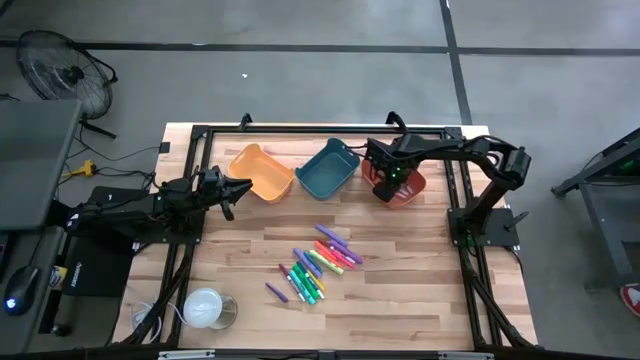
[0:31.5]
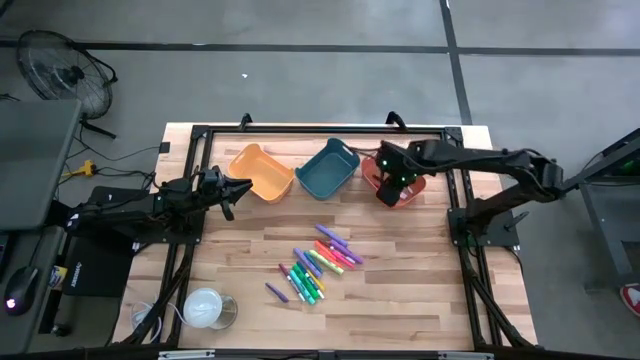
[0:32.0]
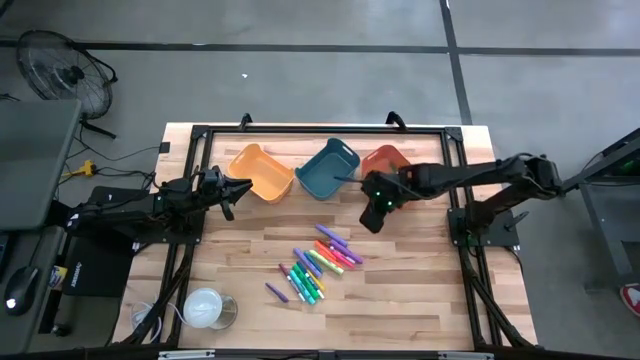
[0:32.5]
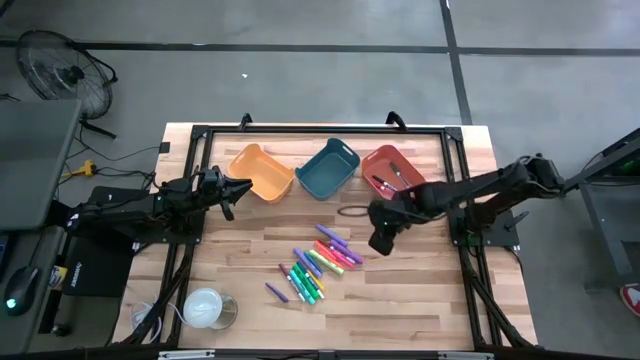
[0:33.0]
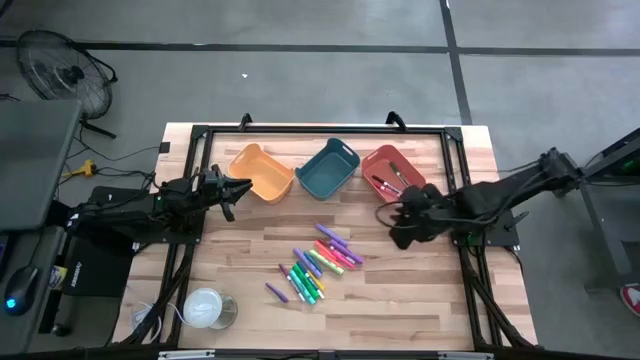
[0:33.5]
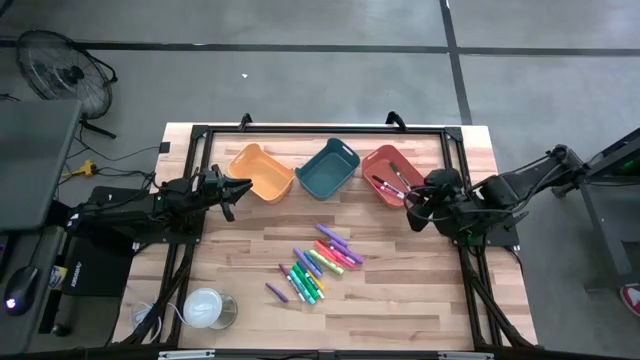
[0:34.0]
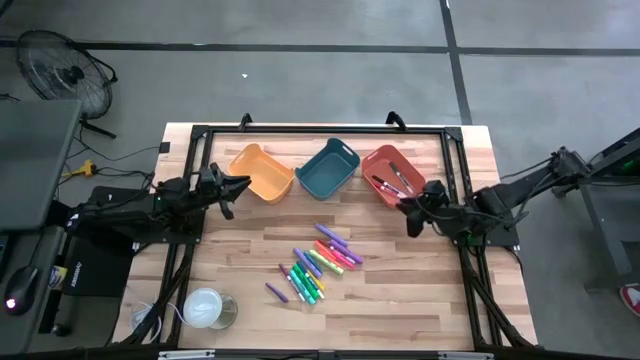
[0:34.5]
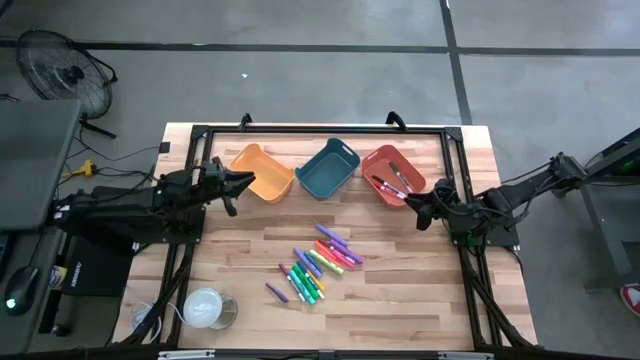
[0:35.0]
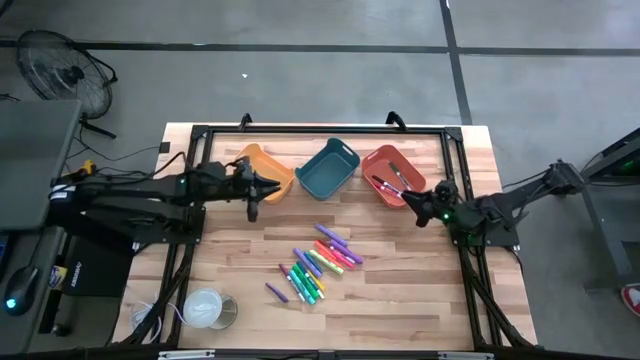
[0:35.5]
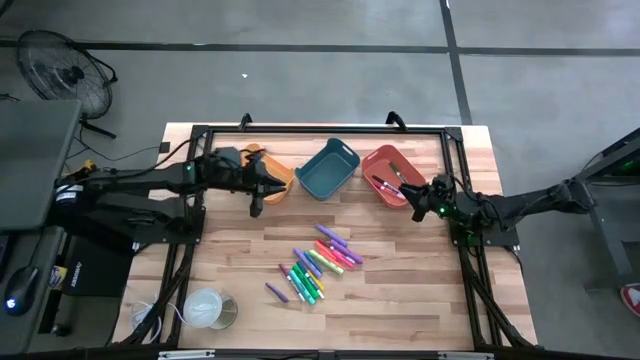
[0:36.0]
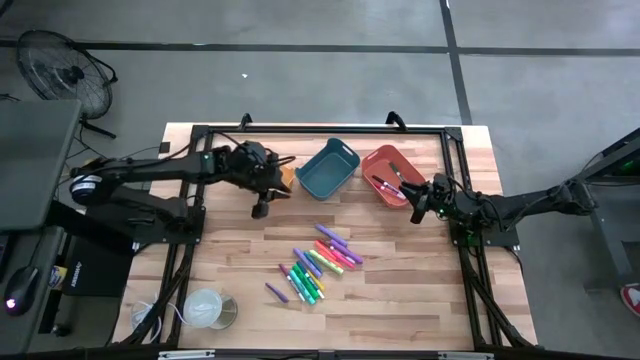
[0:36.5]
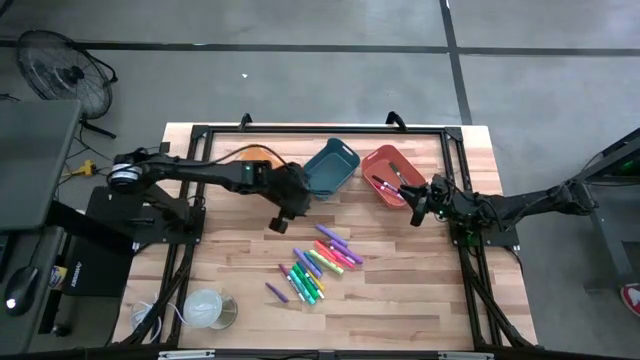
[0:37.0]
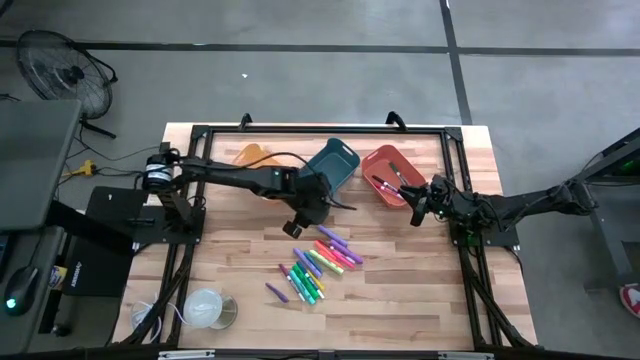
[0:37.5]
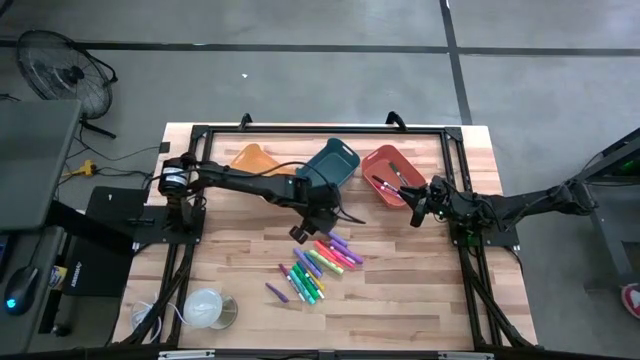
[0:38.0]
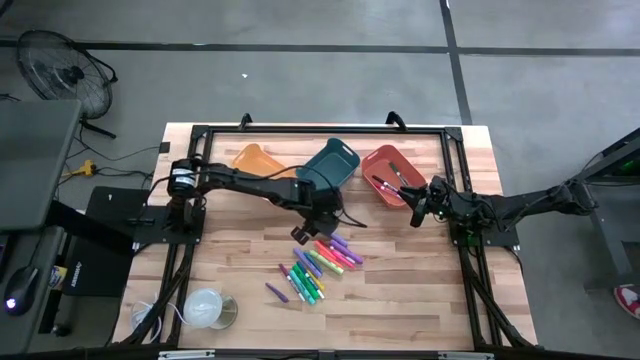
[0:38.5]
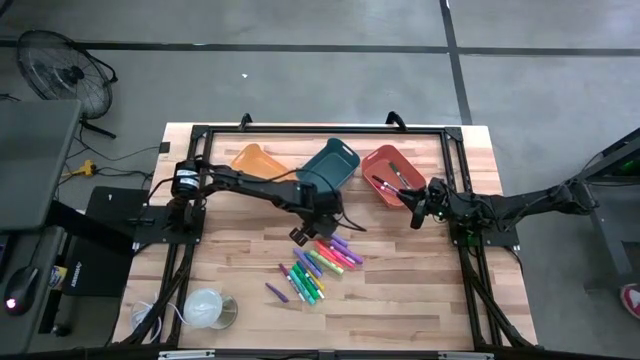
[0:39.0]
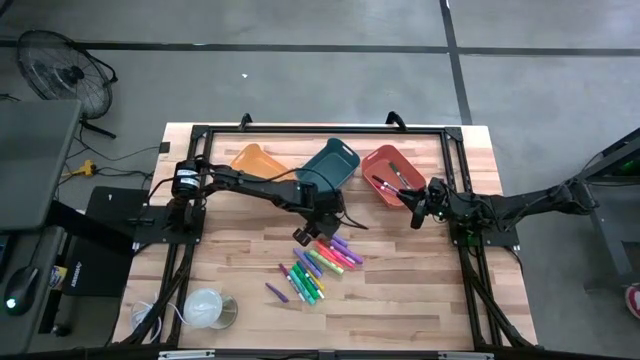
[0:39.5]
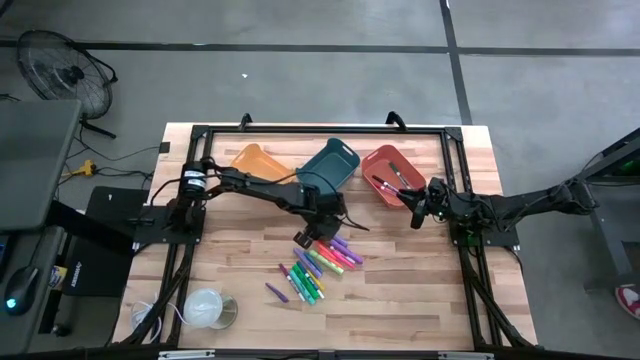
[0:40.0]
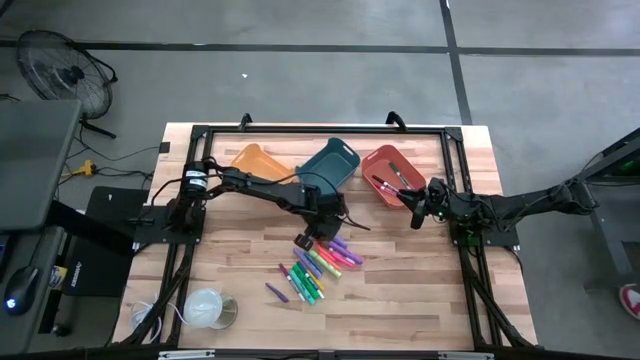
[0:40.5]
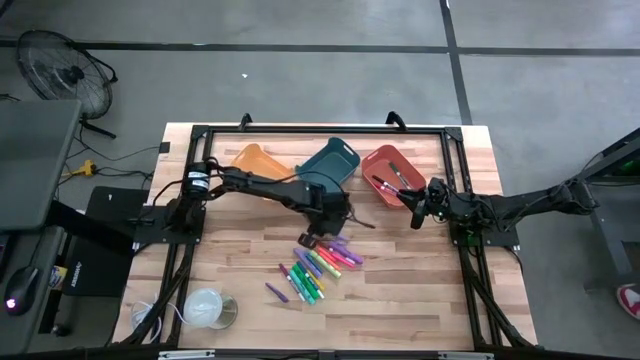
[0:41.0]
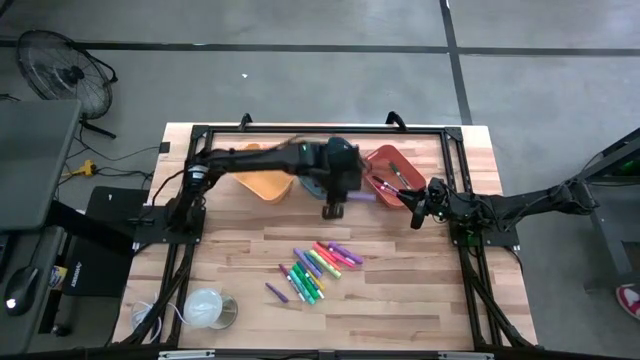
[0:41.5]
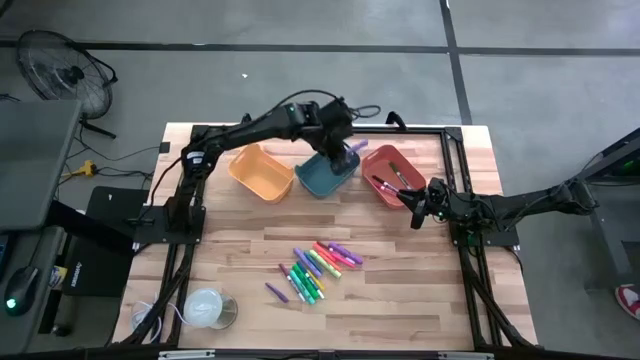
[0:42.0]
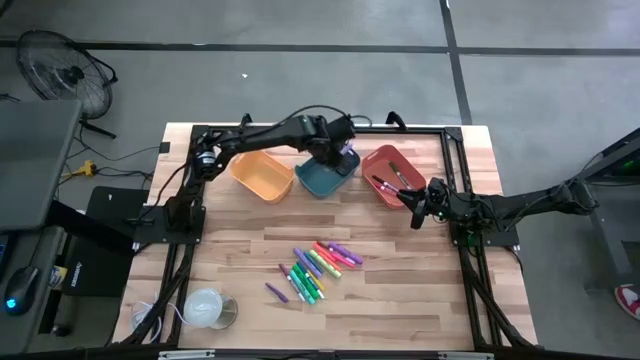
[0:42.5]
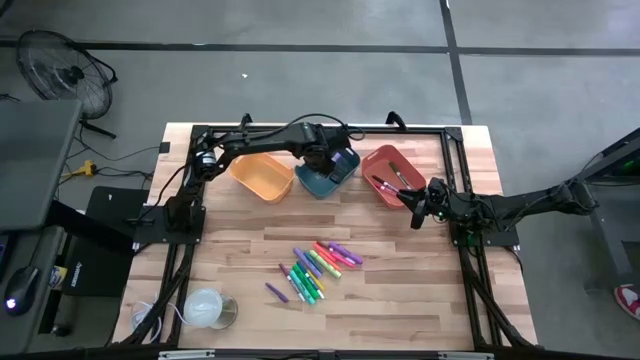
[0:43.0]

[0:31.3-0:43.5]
Task: Pick & Place Markers
Put the top purple highlighter pen into the blue bin

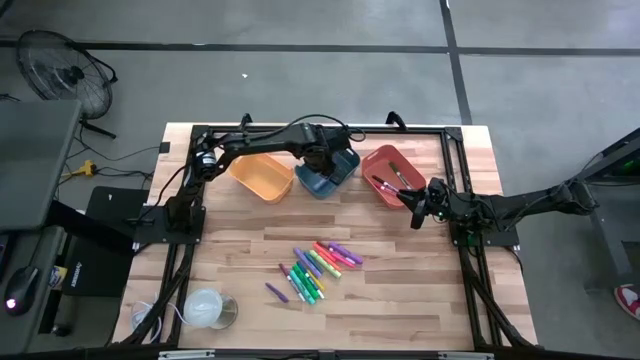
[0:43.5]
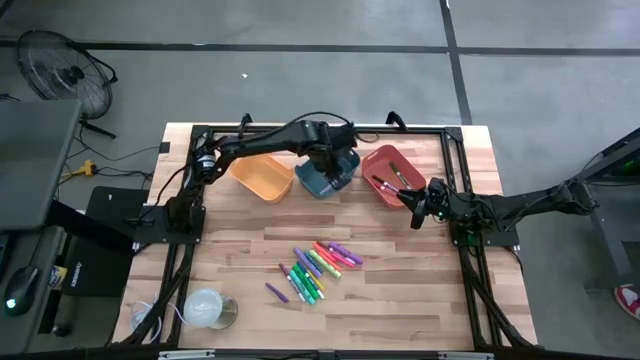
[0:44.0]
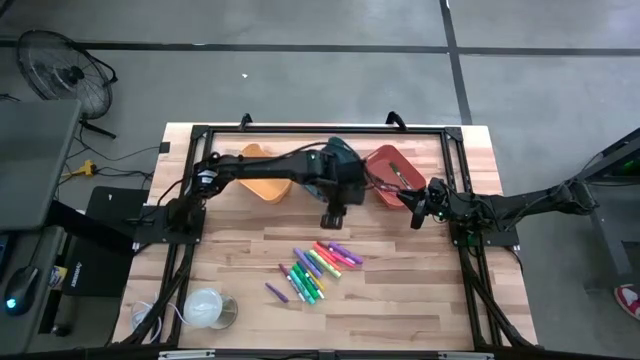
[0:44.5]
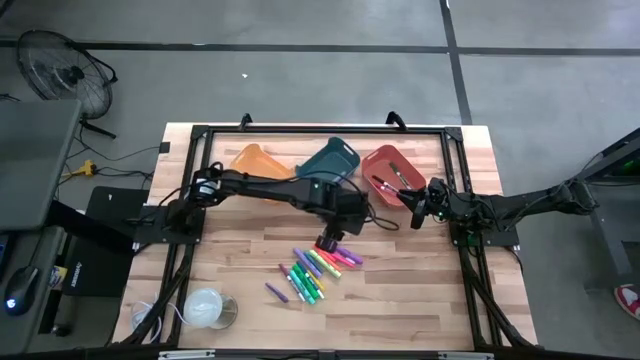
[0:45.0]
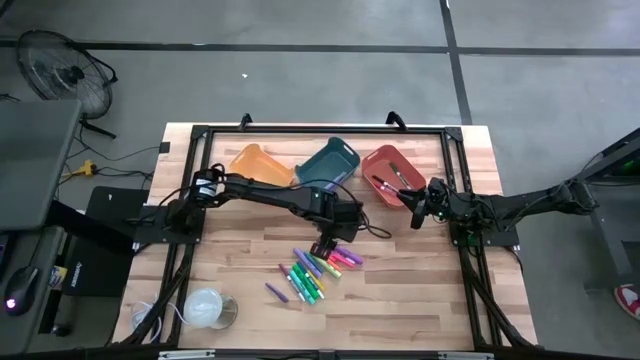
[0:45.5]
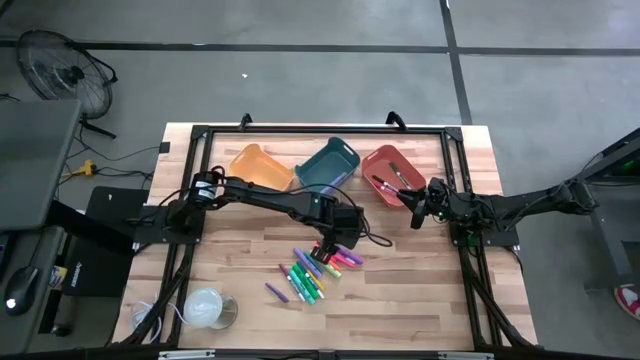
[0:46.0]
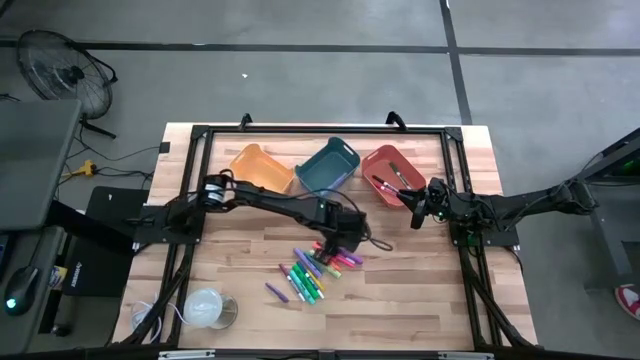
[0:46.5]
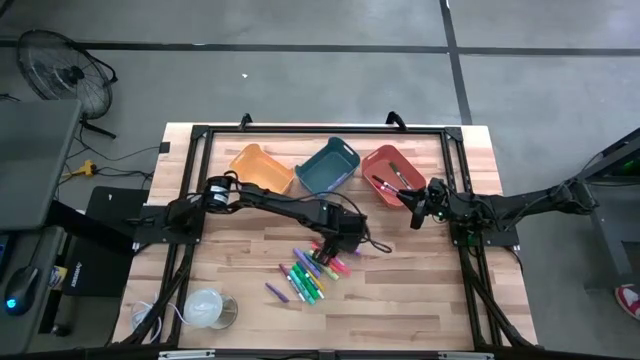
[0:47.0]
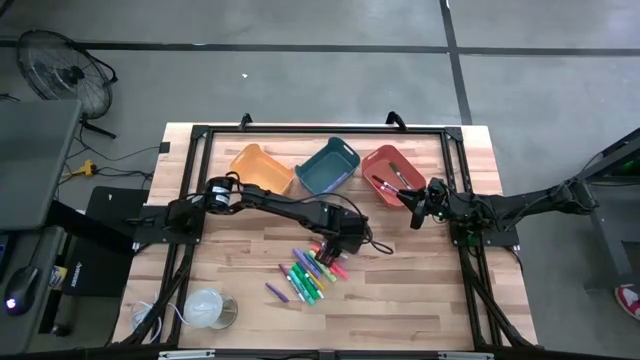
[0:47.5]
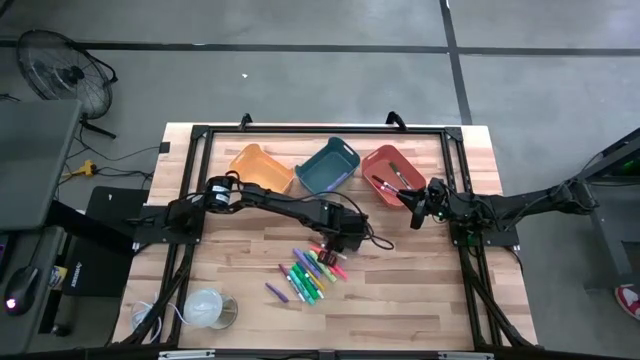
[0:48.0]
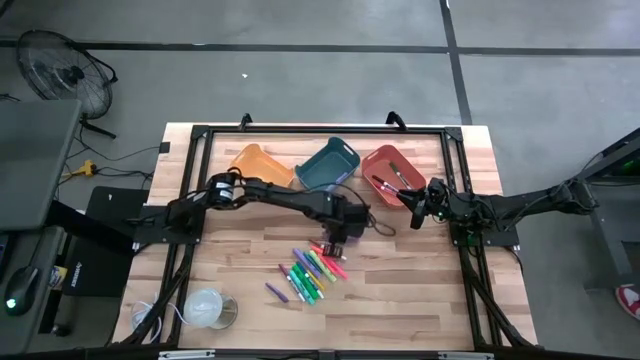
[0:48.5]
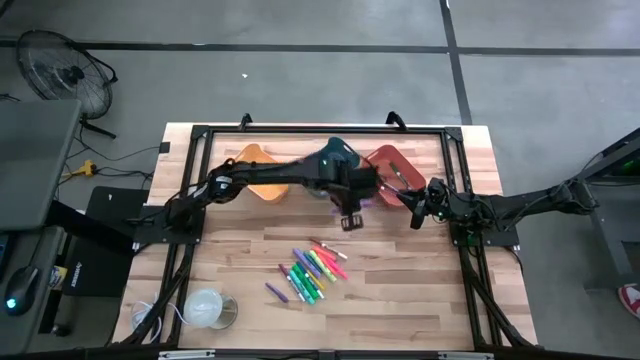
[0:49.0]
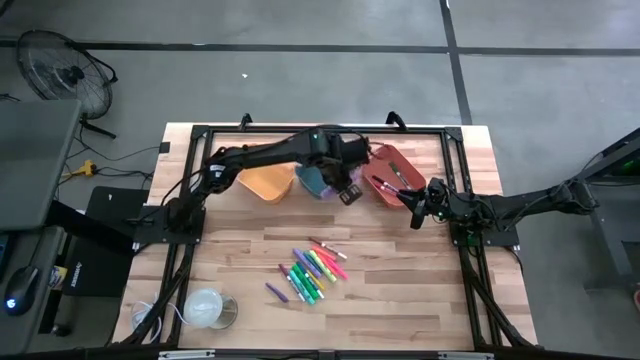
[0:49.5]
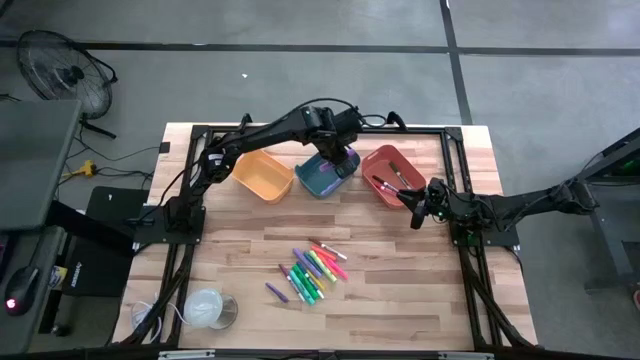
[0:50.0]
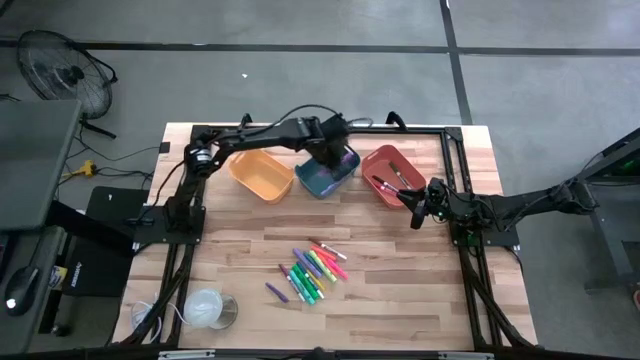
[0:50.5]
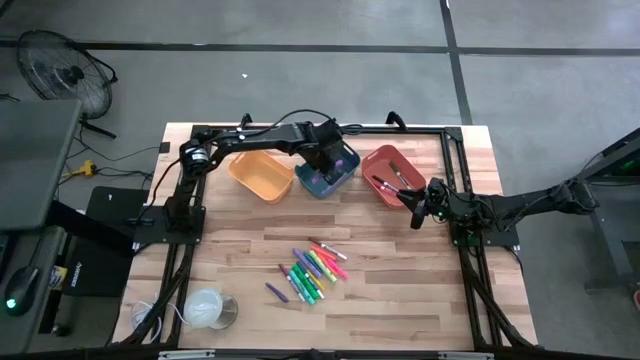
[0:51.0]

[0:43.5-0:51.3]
Put the dark purple highlighter pen into the blue bin
